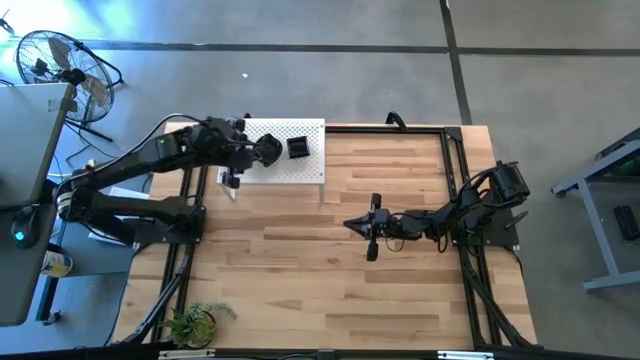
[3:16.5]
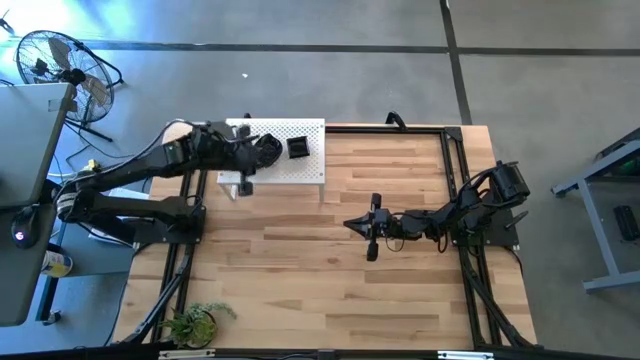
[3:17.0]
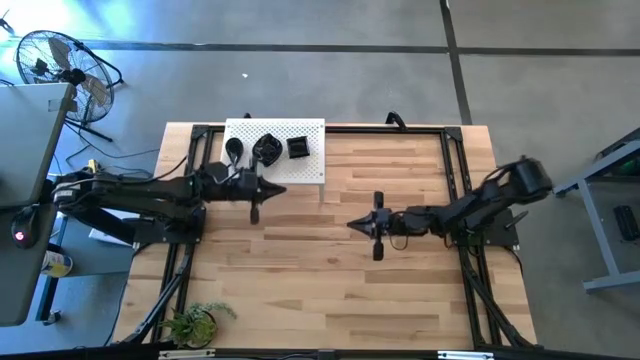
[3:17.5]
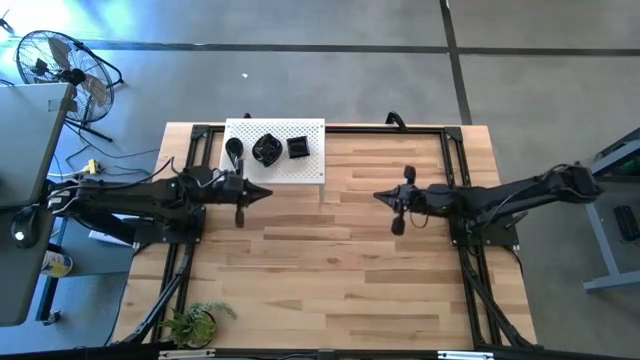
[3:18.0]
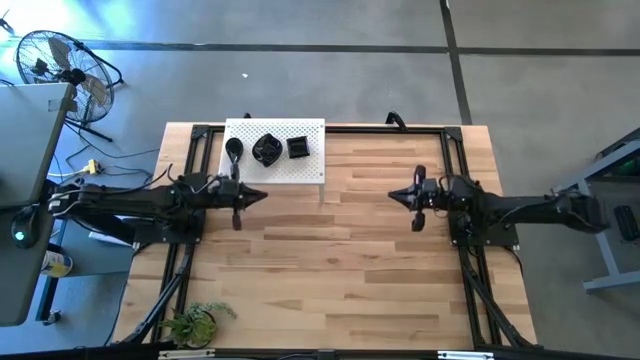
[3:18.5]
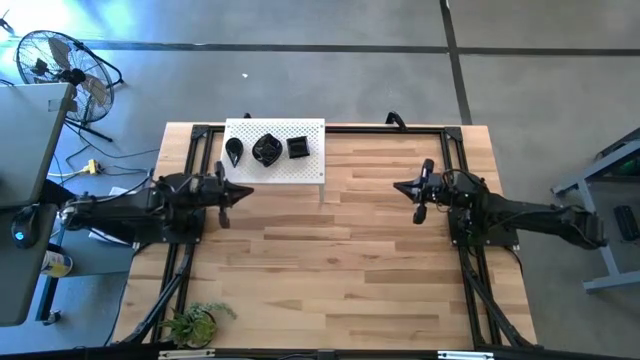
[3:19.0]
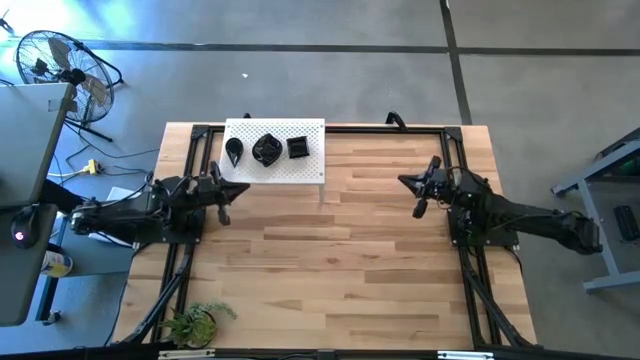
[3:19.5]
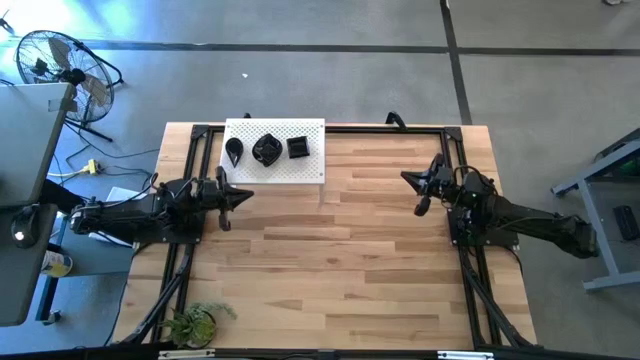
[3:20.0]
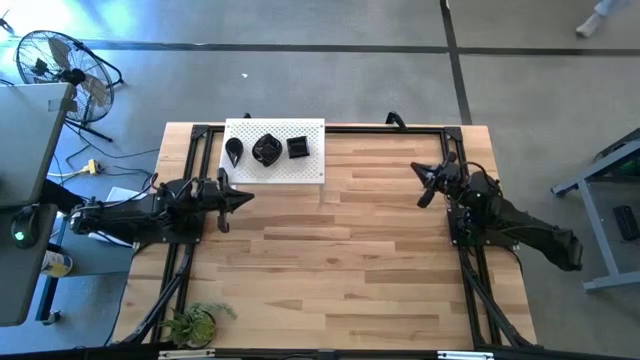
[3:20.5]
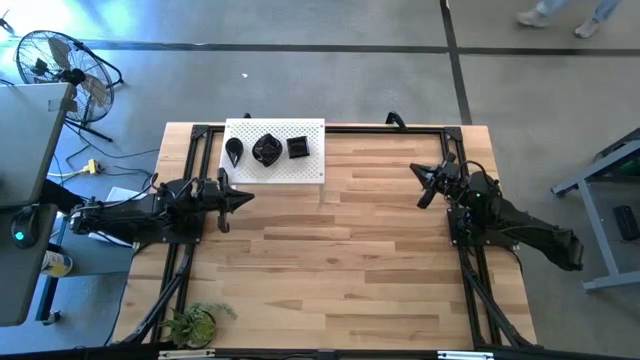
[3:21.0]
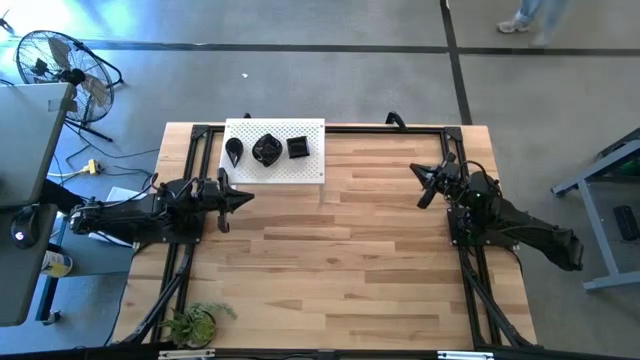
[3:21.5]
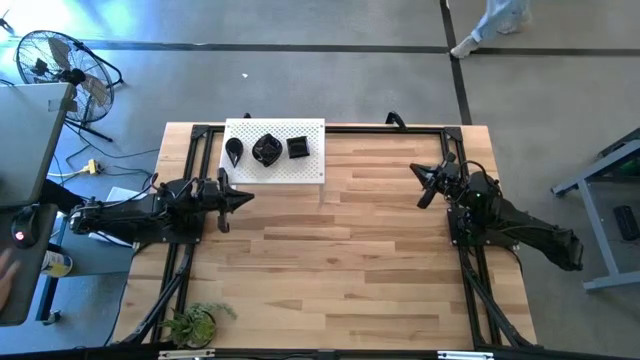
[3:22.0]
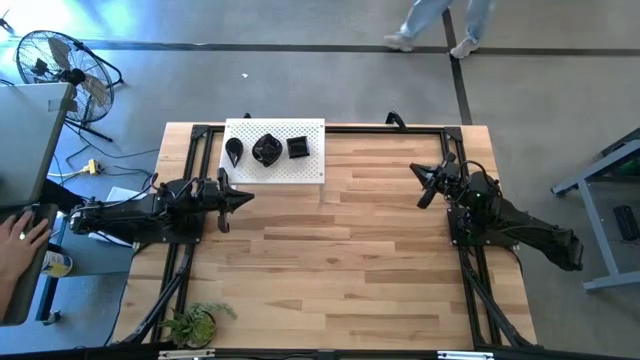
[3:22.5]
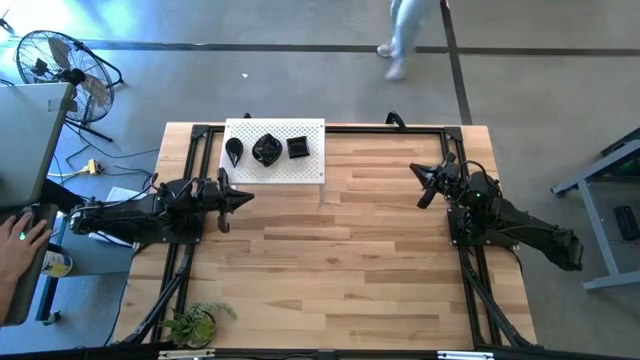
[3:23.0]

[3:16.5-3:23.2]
Task: Pick & Place Mini shaped plates
Return to Home Position

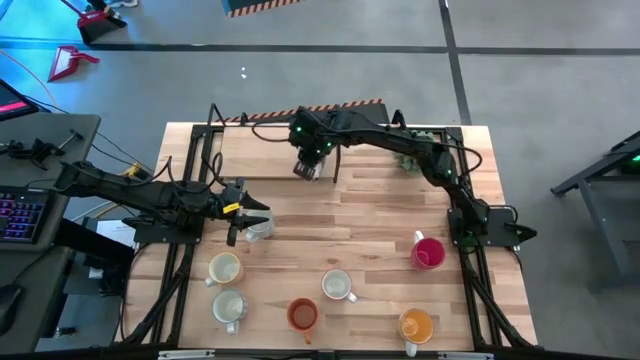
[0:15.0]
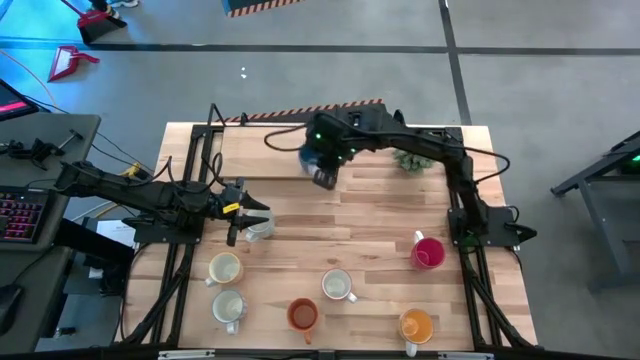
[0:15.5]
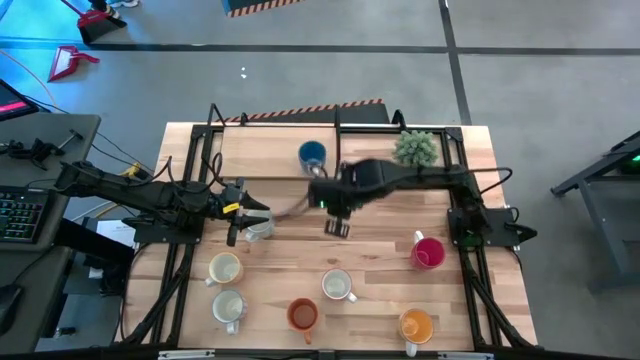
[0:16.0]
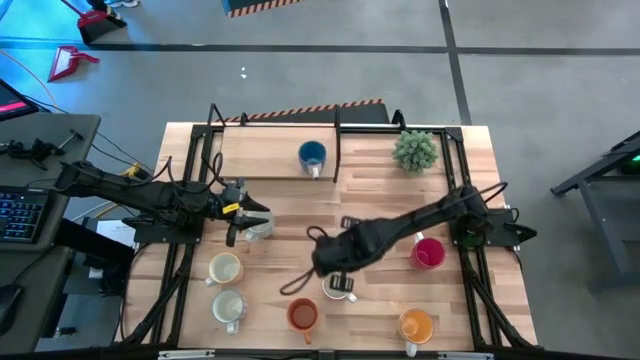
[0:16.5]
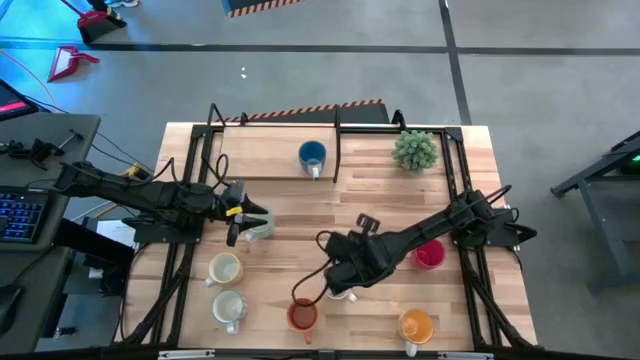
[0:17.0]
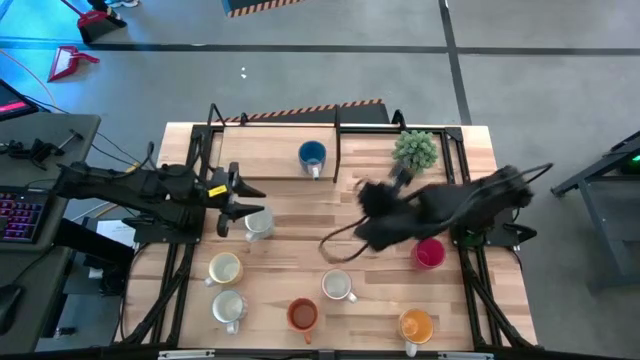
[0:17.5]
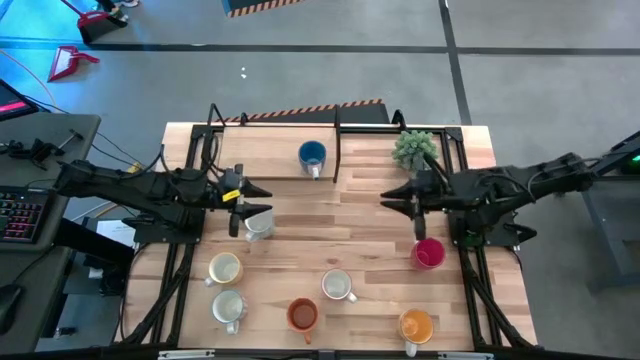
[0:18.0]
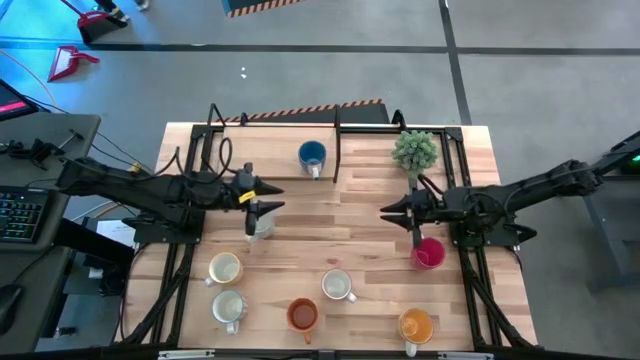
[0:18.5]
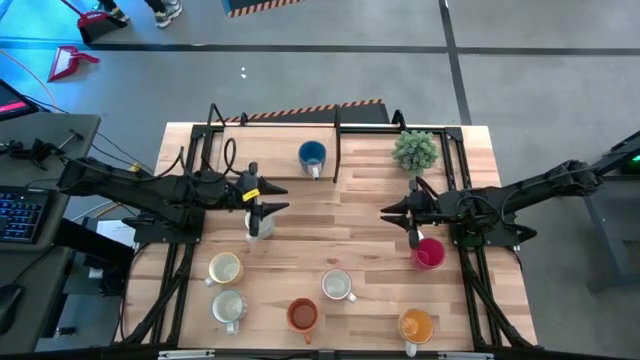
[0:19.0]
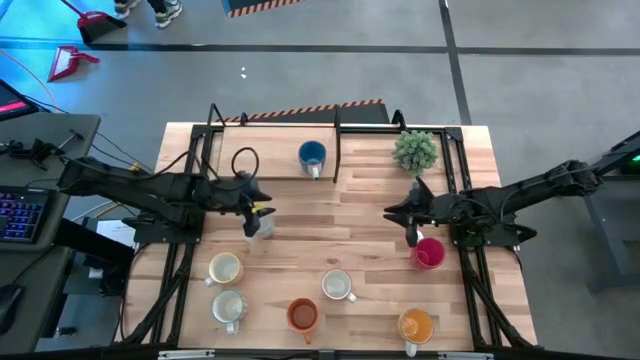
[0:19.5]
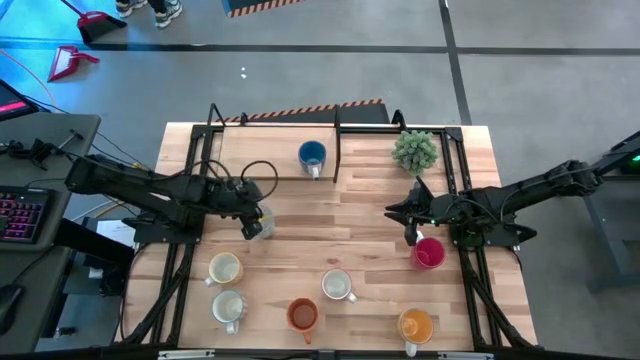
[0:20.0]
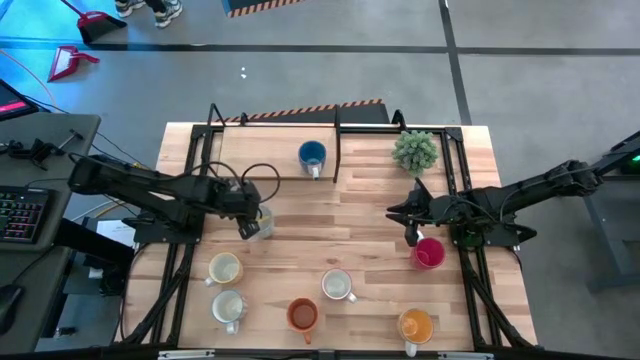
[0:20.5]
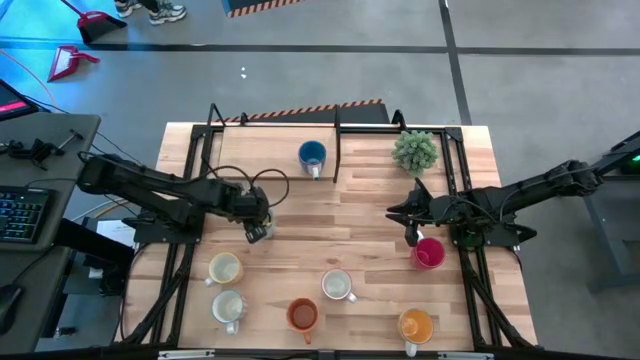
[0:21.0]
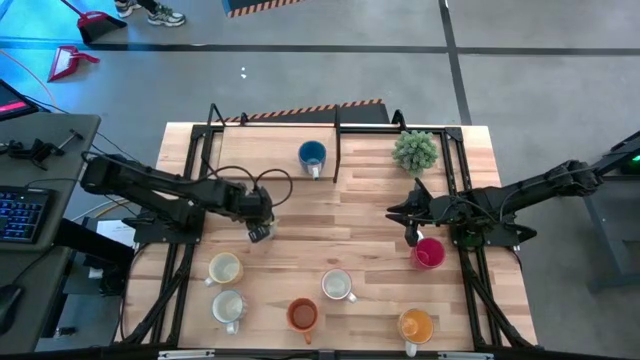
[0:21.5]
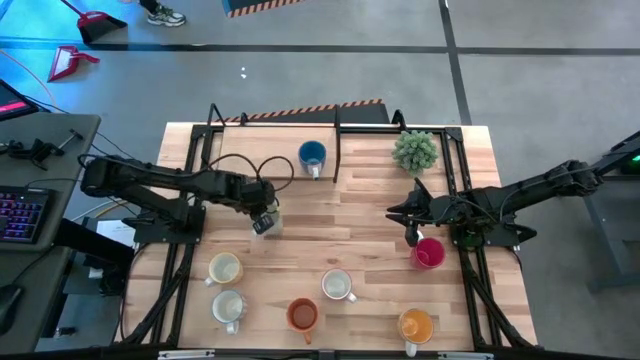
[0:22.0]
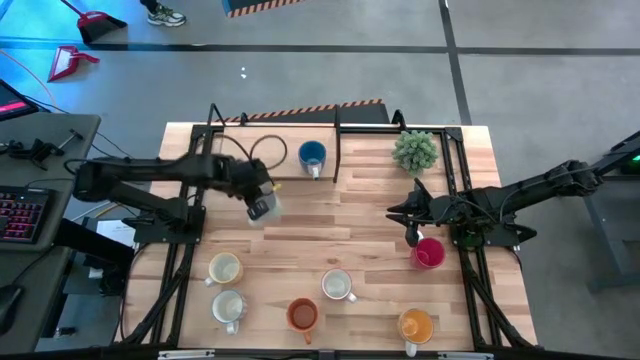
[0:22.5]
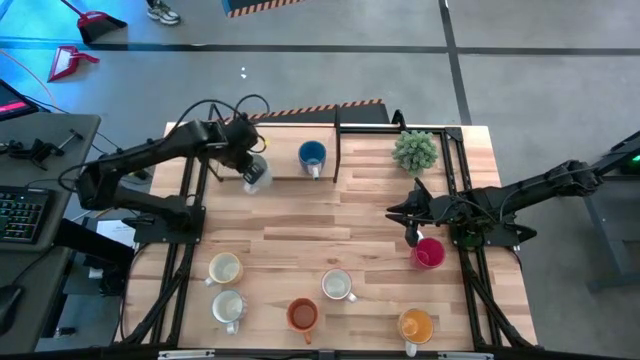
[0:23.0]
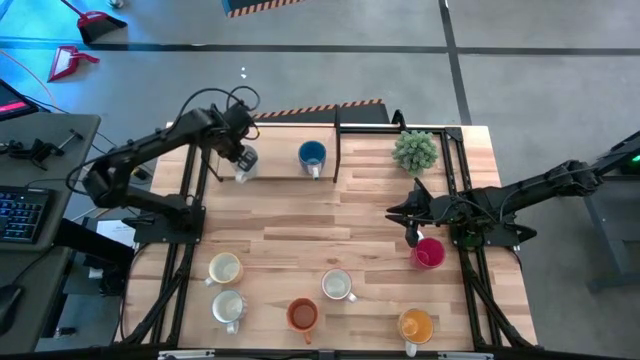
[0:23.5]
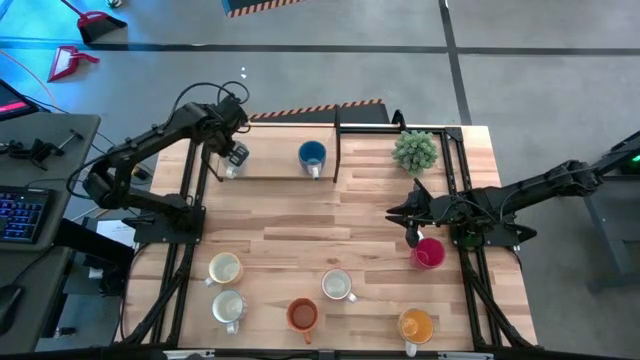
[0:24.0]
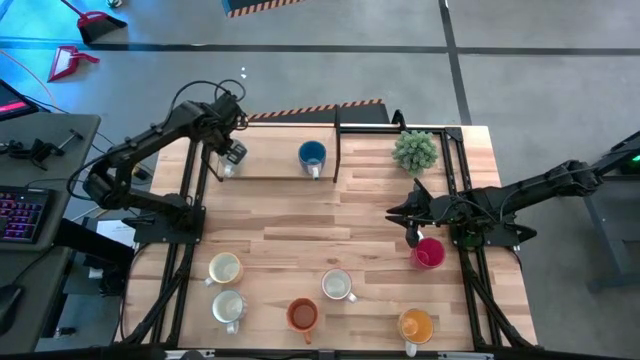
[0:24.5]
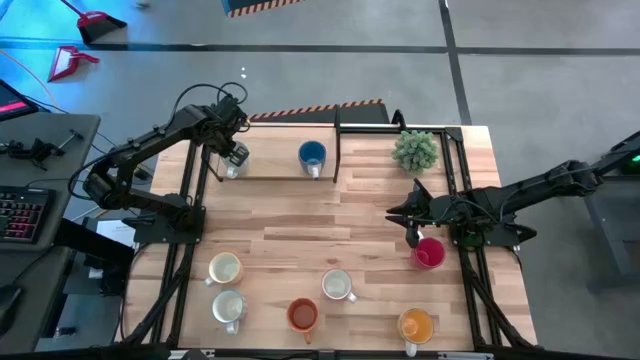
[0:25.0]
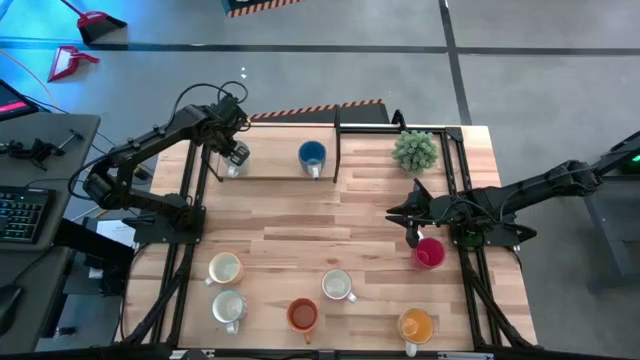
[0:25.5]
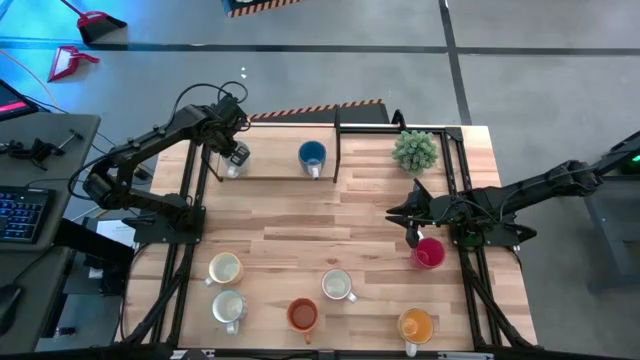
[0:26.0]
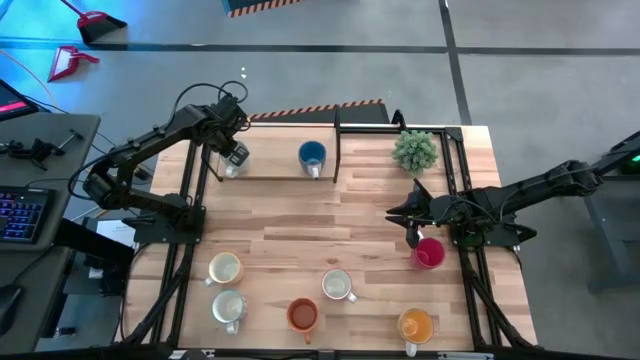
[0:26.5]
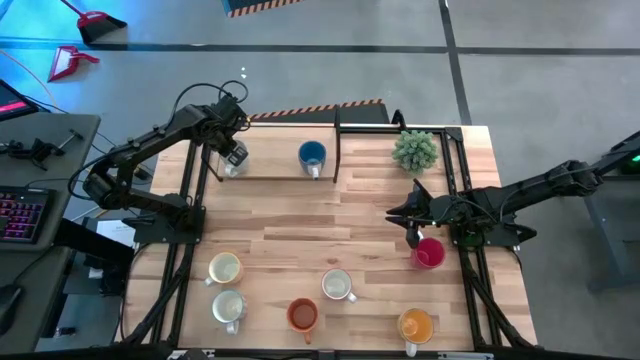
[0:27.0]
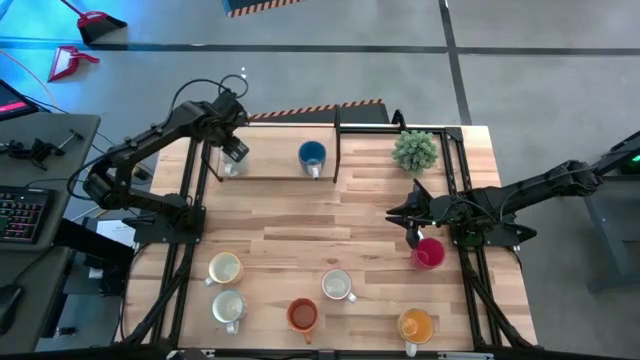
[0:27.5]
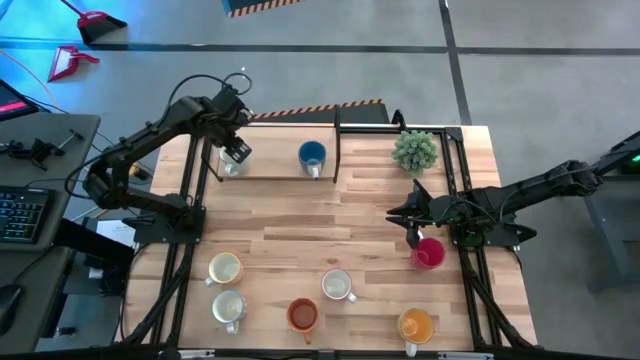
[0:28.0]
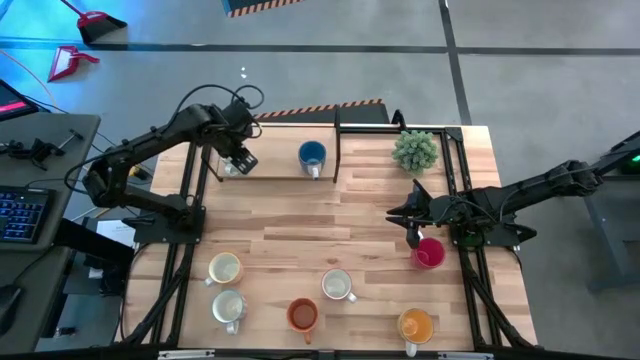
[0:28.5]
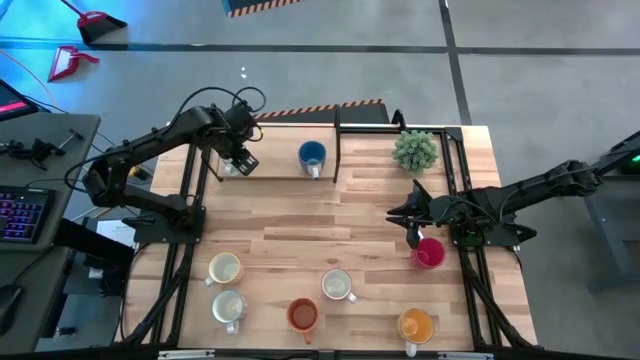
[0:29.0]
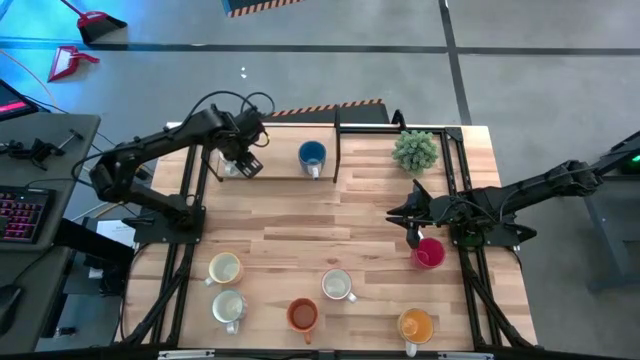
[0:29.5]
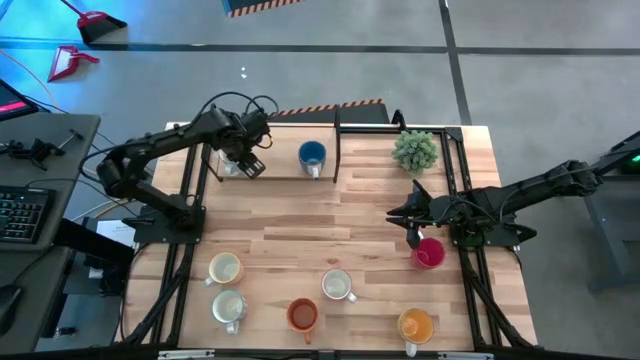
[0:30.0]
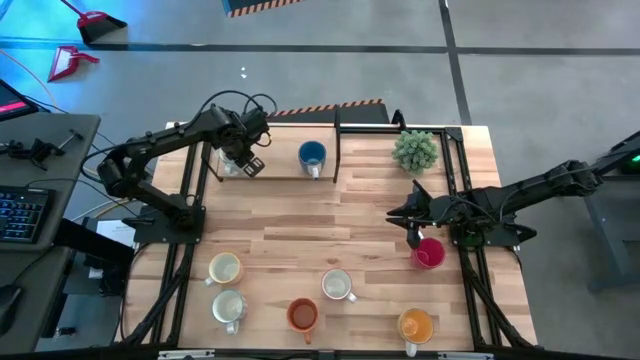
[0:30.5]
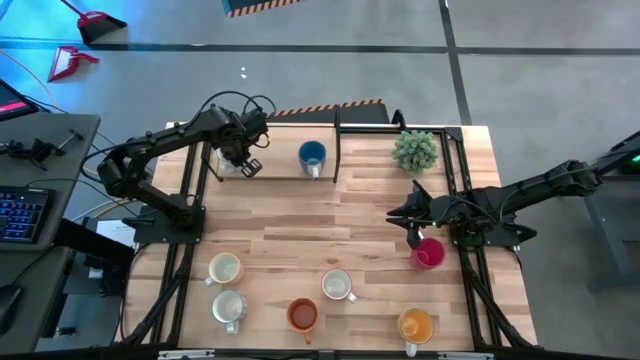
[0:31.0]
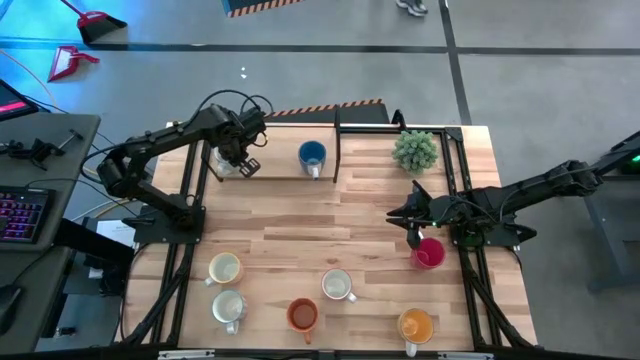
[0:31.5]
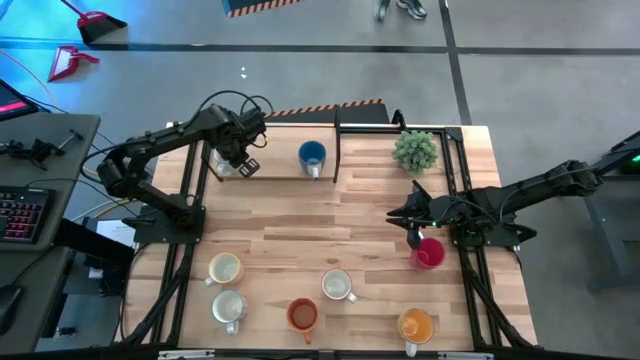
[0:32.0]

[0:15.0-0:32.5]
Task: Place coffee mugs
Put the green patterned mug on the shelf
